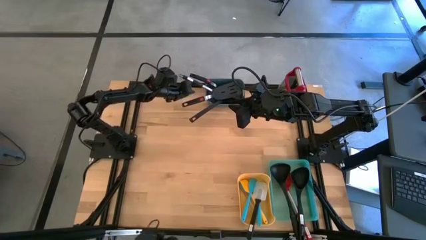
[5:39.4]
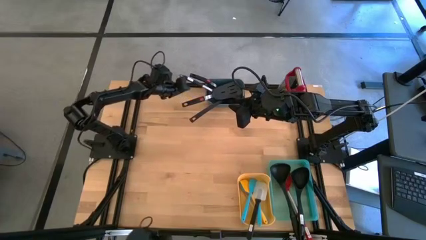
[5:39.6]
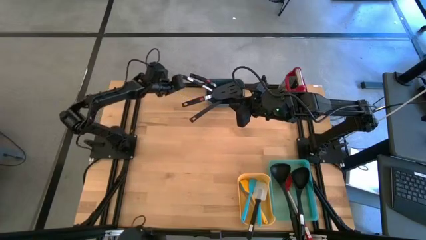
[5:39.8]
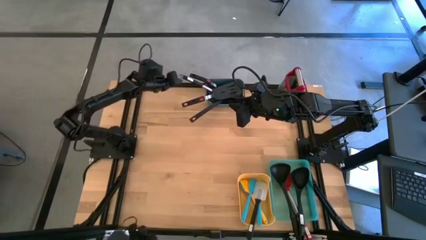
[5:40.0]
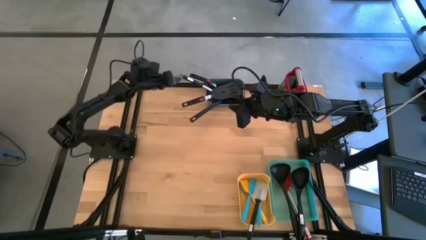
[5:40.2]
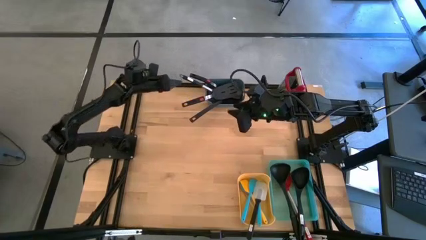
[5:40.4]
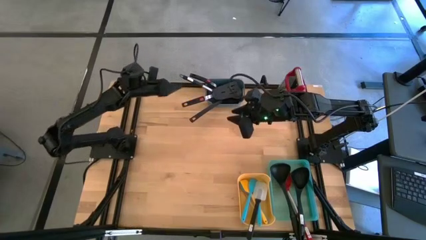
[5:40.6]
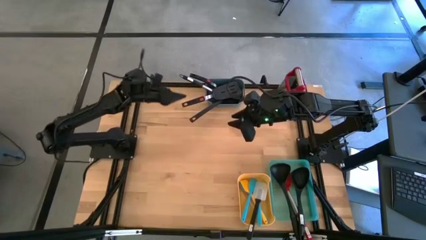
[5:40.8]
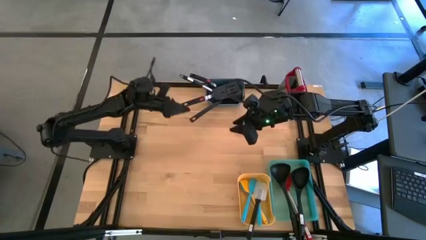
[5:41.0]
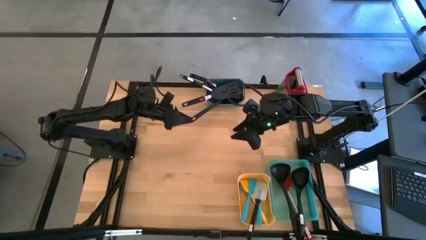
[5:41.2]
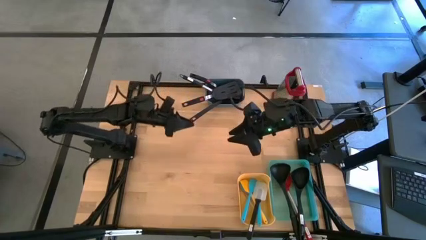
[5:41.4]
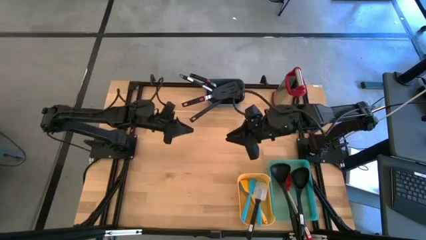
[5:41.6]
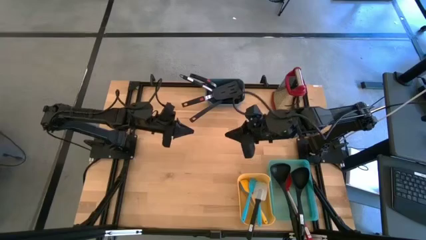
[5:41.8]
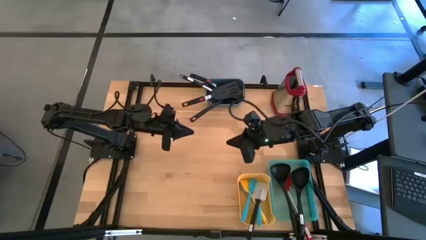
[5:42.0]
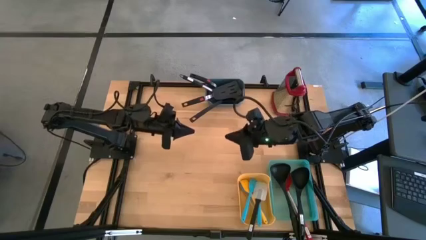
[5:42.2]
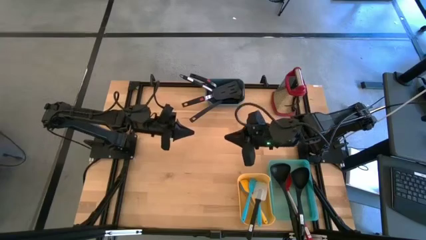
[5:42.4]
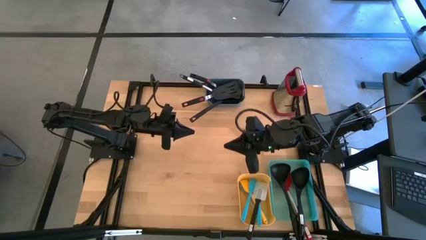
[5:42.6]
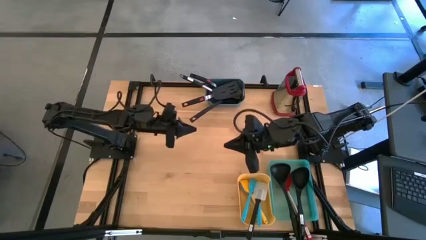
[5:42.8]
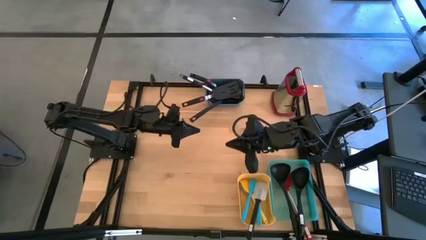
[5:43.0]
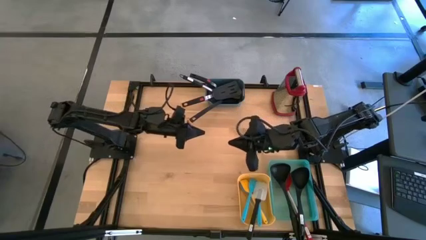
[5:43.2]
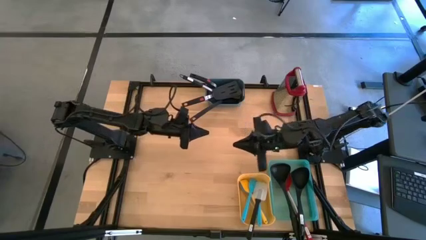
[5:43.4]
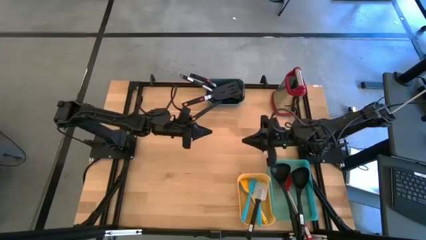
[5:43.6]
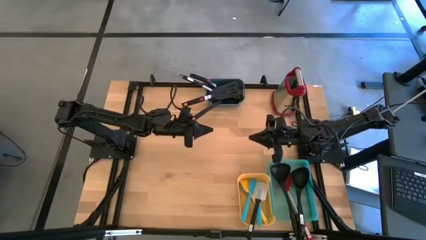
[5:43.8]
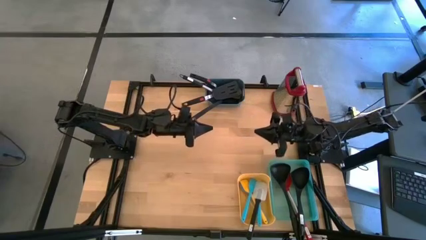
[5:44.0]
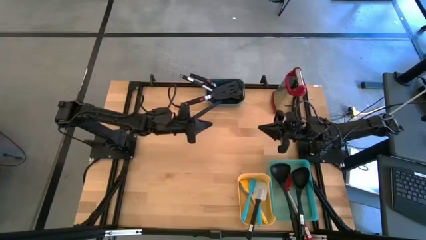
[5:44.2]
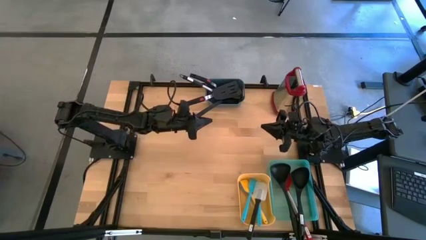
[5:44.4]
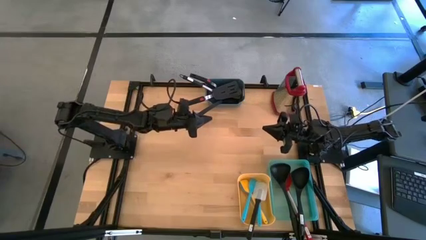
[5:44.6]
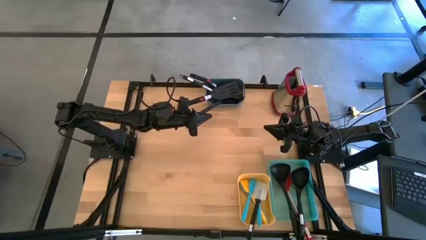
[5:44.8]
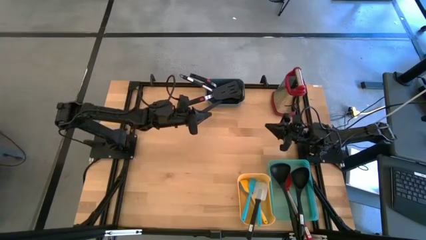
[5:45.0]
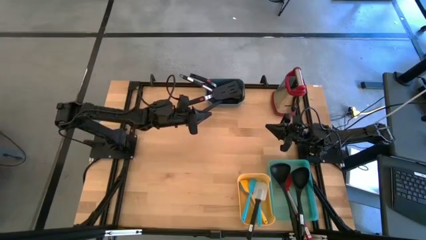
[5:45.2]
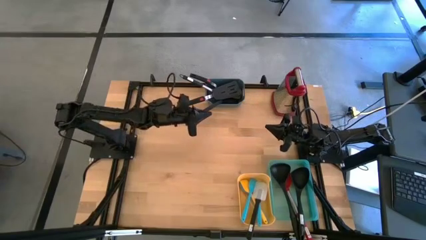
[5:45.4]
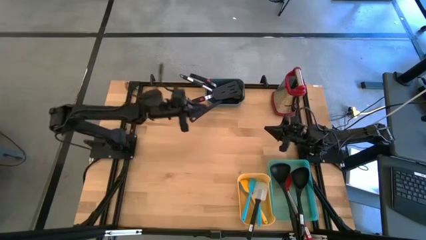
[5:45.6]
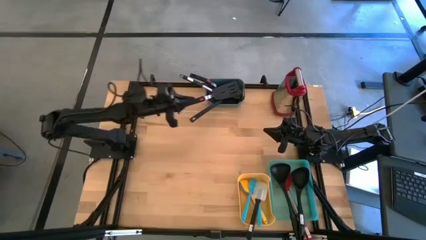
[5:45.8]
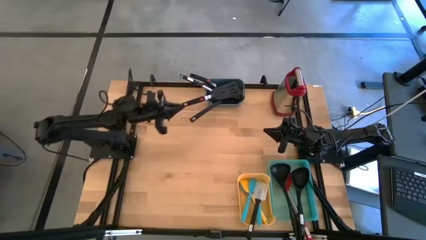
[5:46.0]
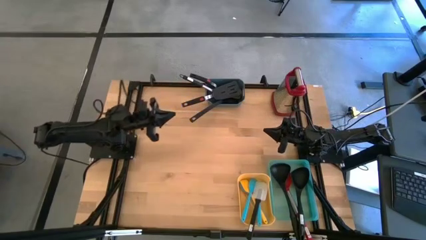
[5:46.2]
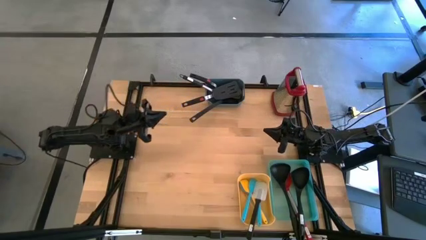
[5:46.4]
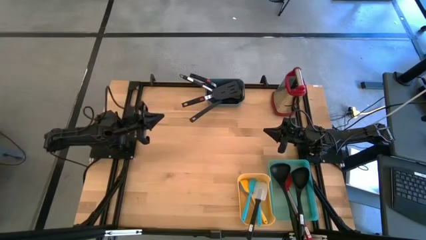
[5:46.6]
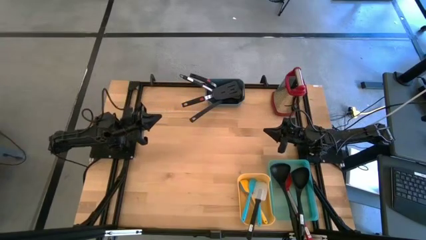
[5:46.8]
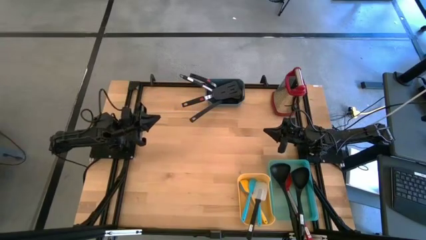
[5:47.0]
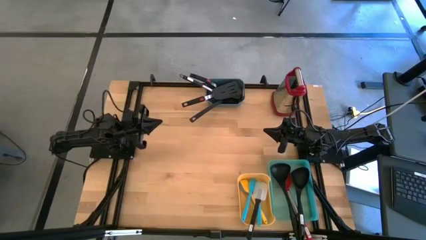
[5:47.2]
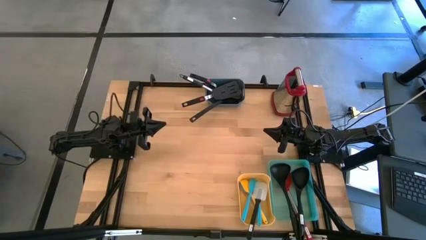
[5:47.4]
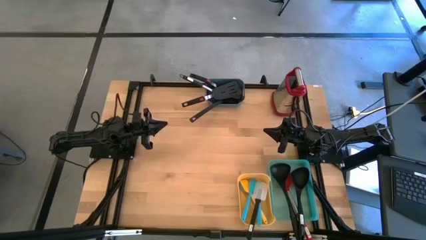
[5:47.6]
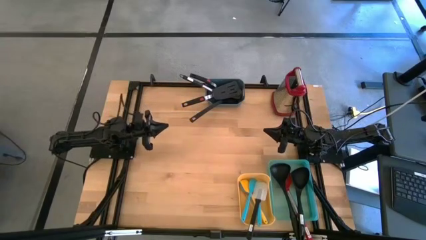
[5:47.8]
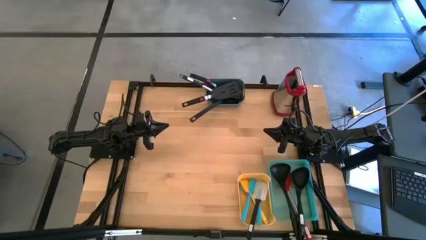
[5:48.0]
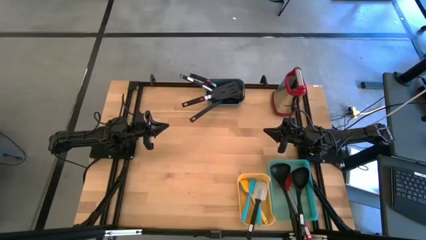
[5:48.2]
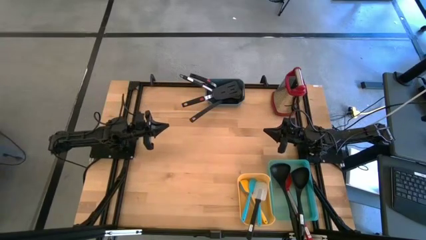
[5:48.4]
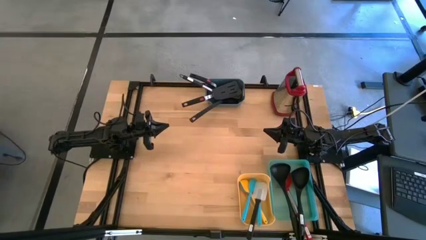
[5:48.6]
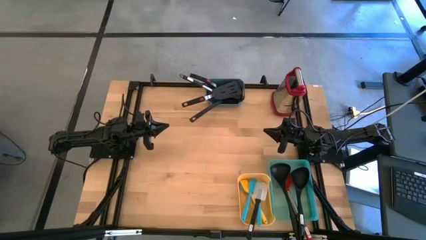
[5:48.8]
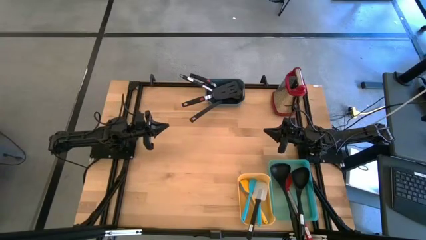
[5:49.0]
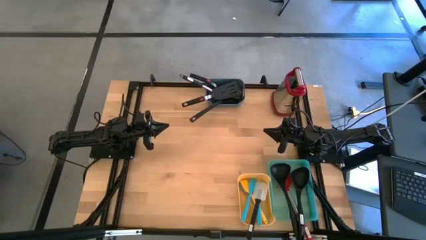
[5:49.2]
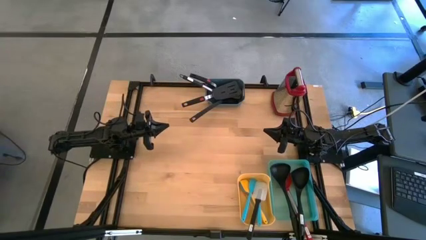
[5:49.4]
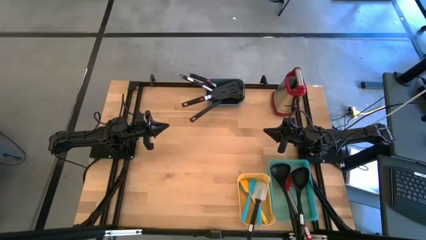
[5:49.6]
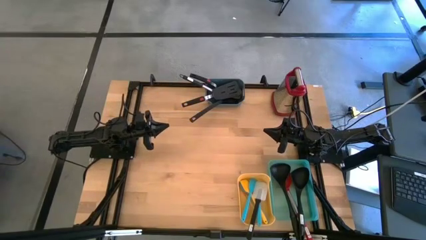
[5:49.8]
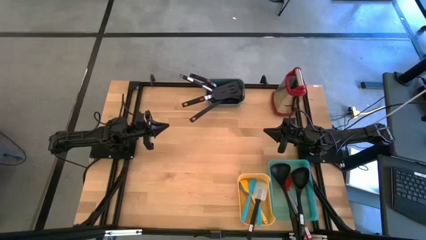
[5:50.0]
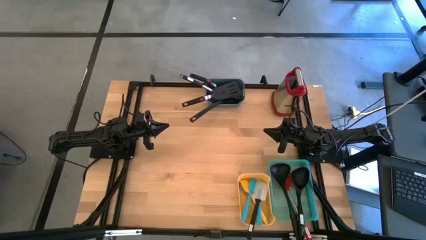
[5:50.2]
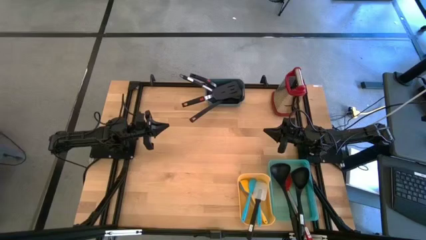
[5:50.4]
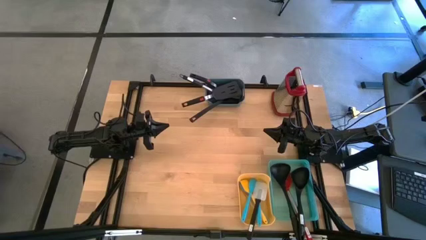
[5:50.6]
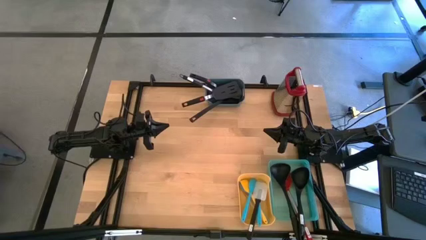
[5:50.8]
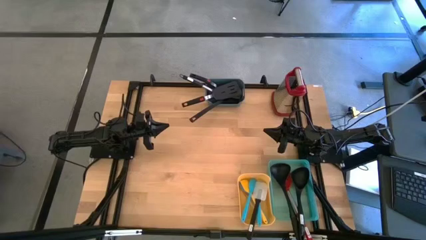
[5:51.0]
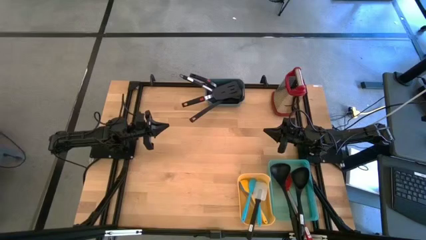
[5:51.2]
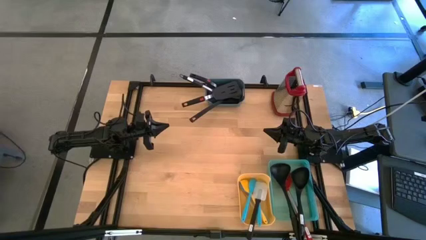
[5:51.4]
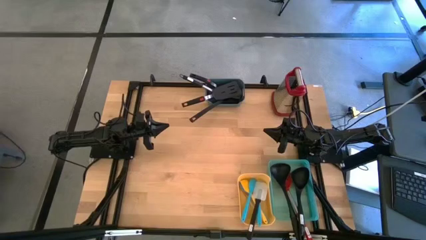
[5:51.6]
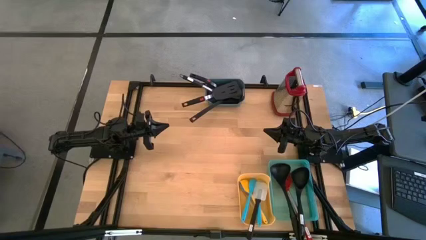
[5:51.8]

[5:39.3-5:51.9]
Task: Pick & Place Kitchen Items
Return to Home Position

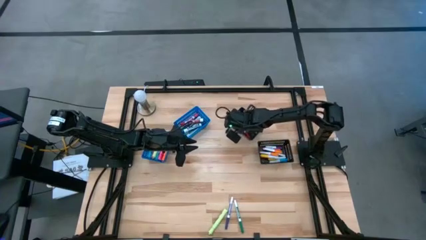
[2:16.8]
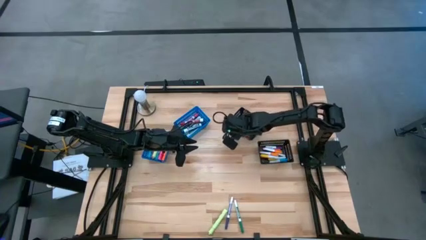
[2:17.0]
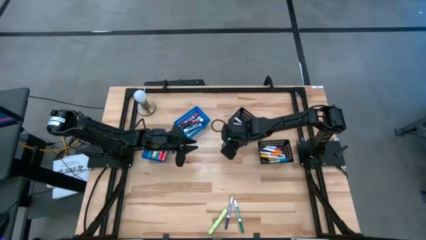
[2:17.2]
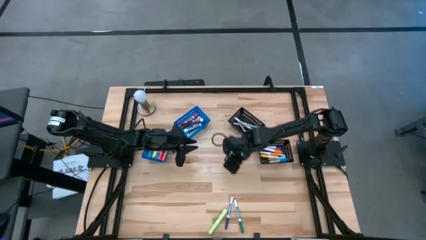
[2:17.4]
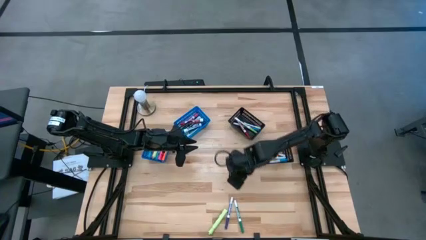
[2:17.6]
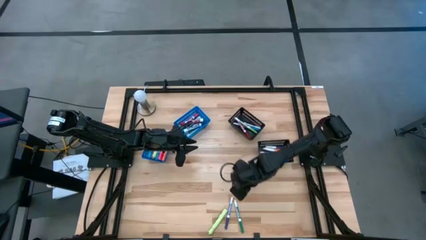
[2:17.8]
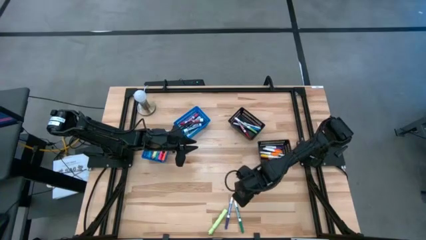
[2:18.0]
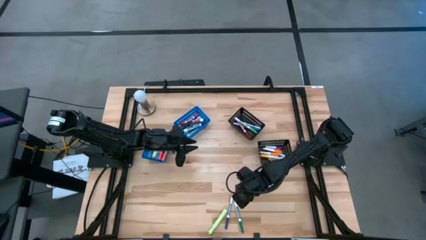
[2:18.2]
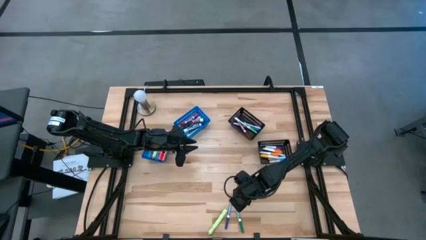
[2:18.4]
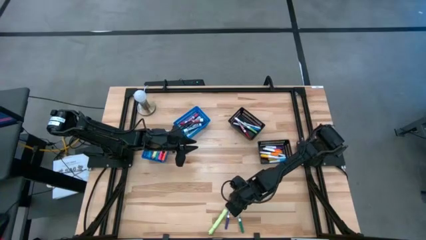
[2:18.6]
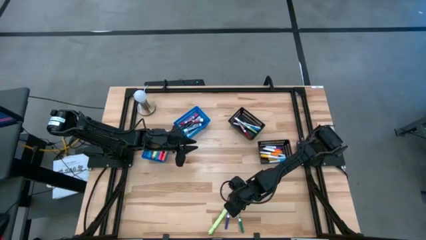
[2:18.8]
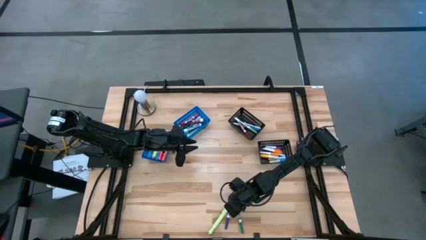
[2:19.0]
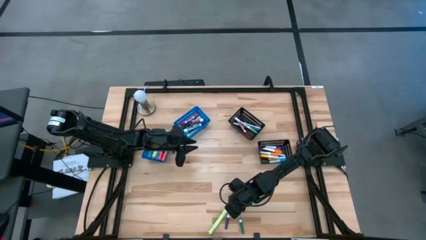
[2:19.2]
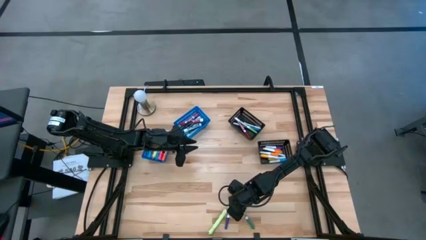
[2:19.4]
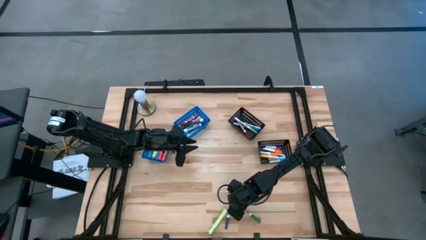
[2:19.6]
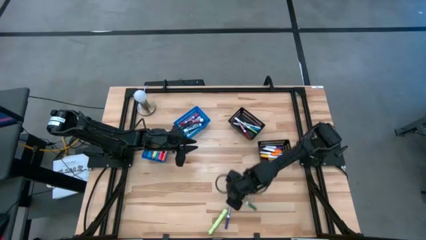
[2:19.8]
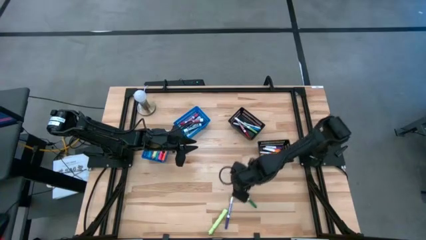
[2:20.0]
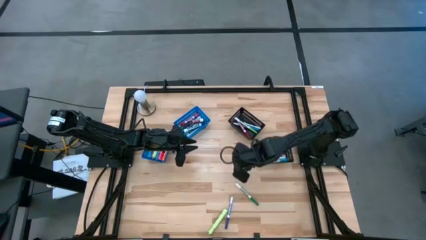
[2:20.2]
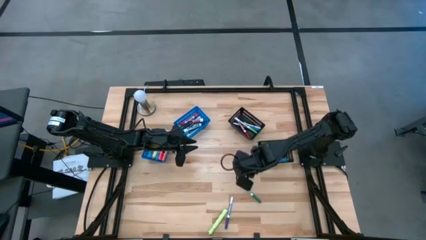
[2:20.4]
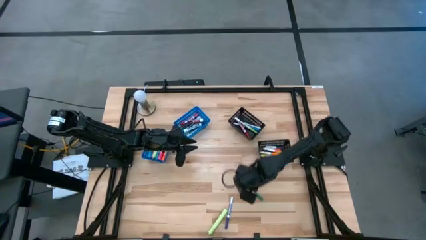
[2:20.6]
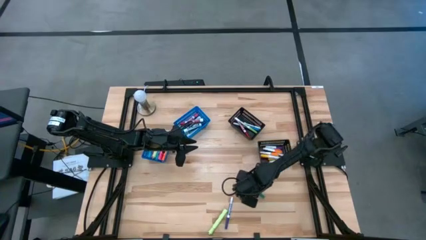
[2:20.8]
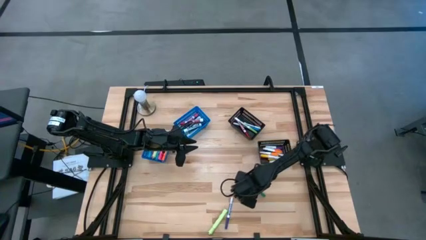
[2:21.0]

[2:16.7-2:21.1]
Task: Pick & Place Markers
Put the dark green marker pen into the top black bin

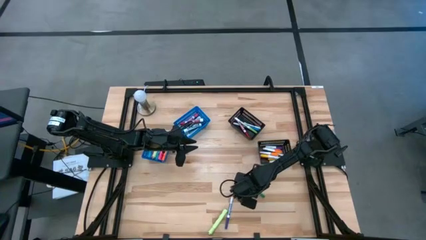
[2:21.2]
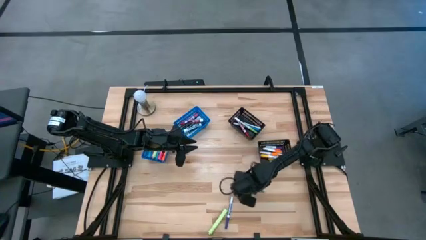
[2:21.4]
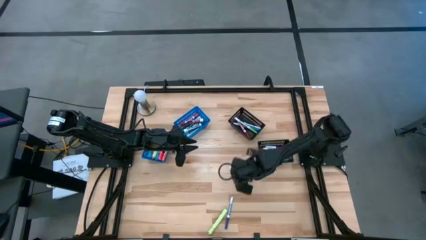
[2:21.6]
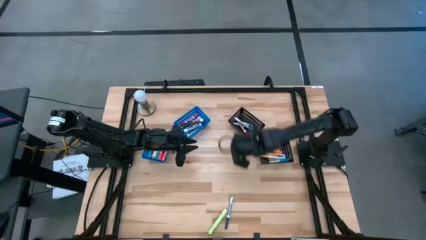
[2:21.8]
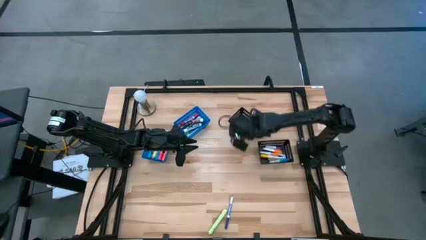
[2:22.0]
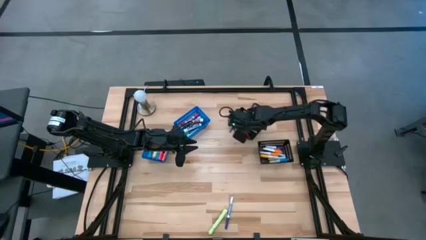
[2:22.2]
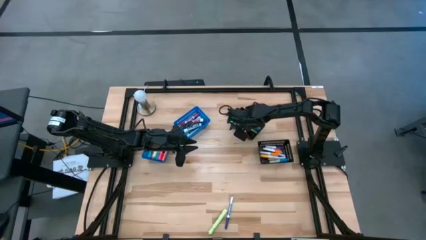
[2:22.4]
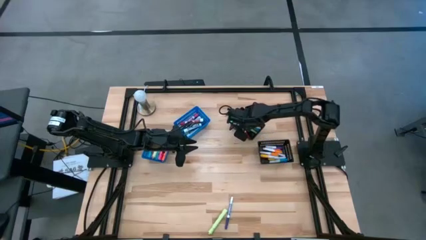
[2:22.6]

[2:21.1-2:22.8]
Put the dark green marker pen into the top black bin
